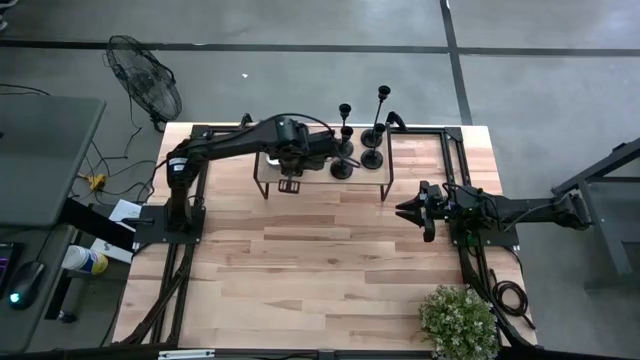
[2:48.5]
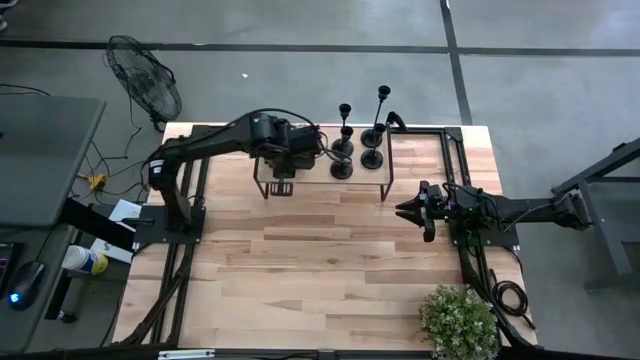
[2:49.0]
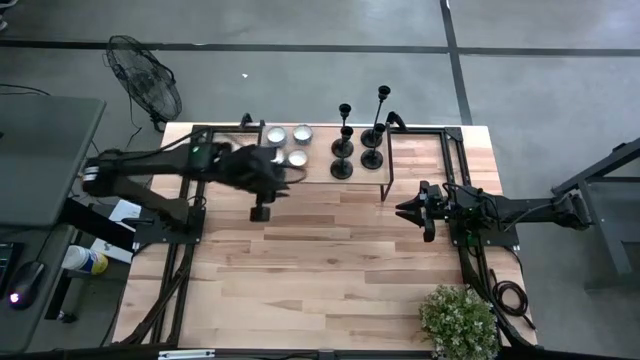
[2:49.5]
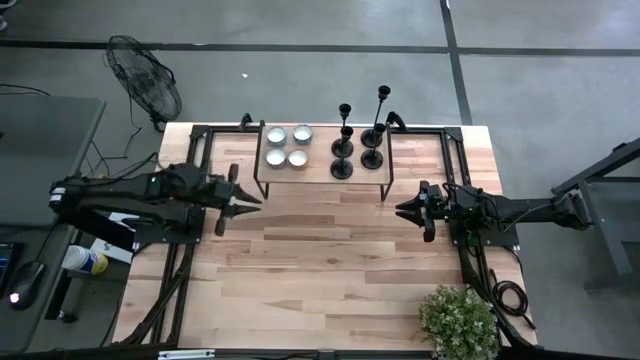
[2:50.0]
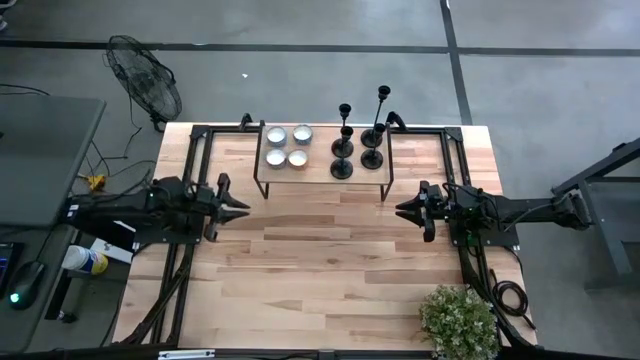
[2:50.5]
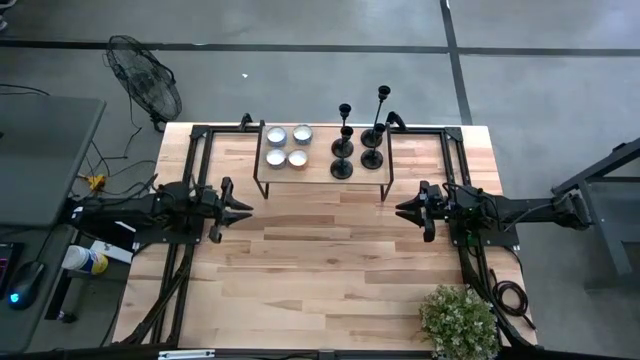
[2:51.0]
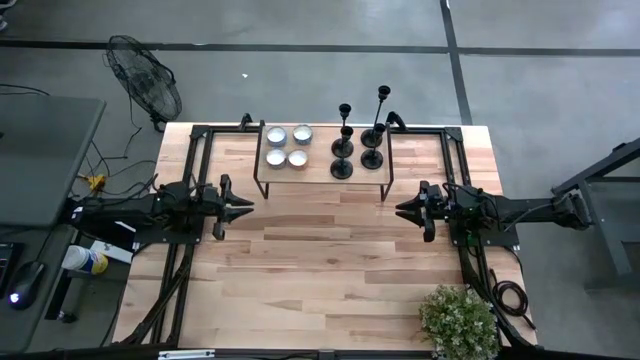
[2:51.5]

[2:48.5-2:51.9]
Task: Pick & Place candle stick holders
Return to Home Position

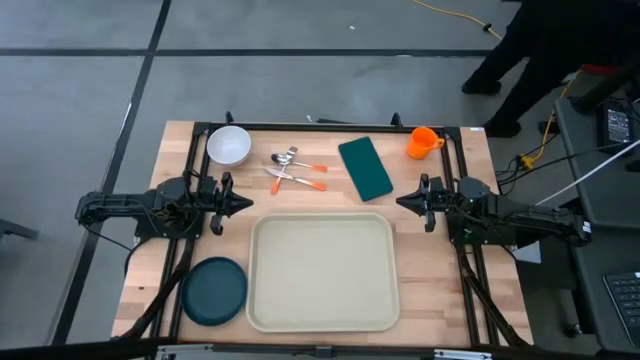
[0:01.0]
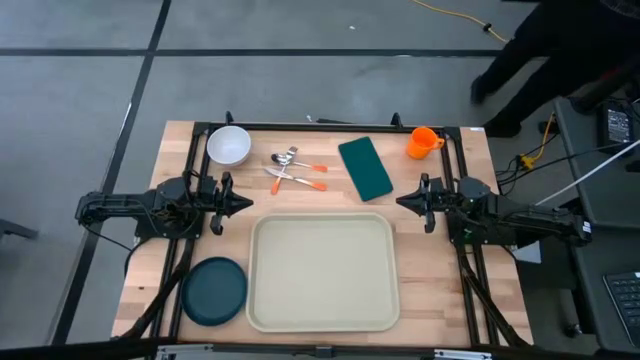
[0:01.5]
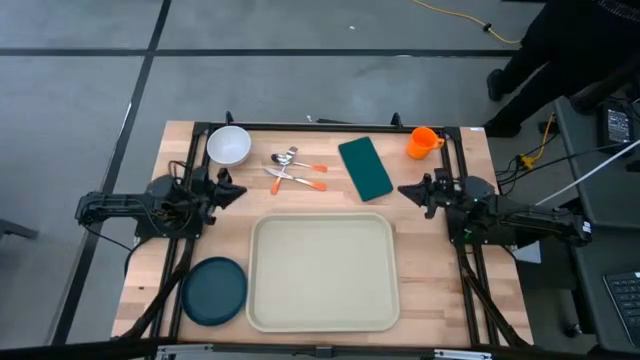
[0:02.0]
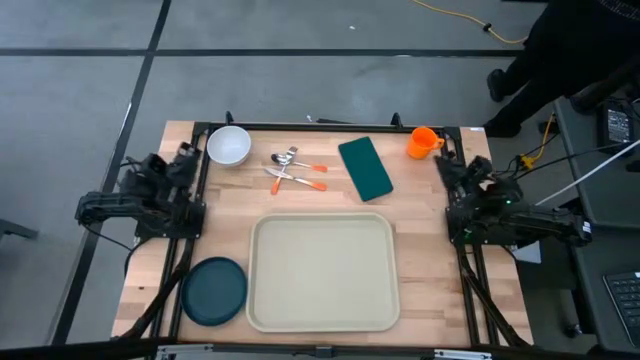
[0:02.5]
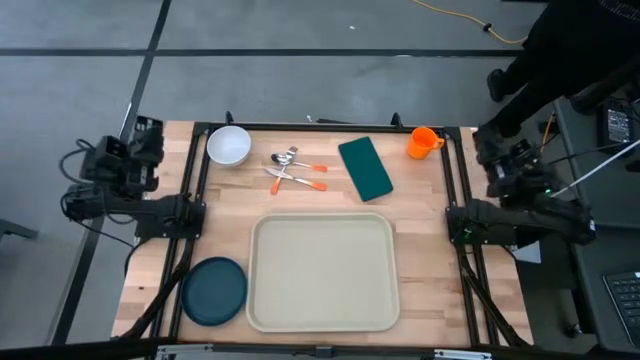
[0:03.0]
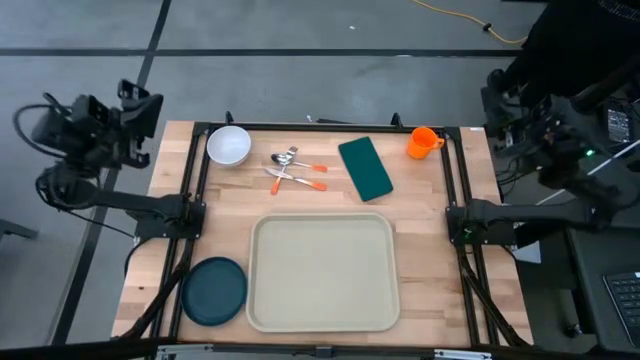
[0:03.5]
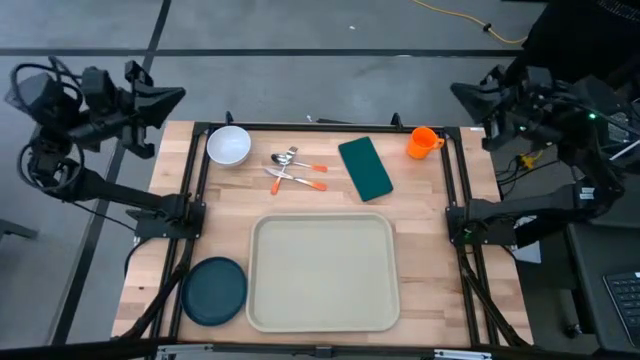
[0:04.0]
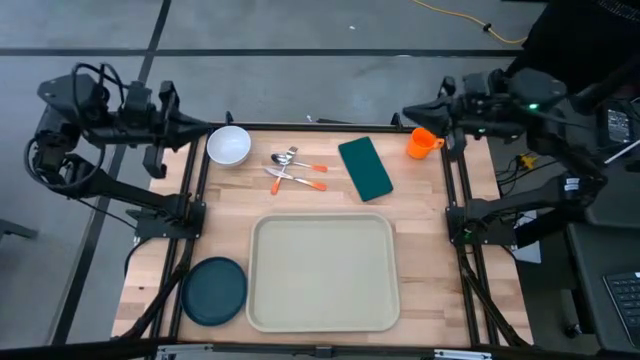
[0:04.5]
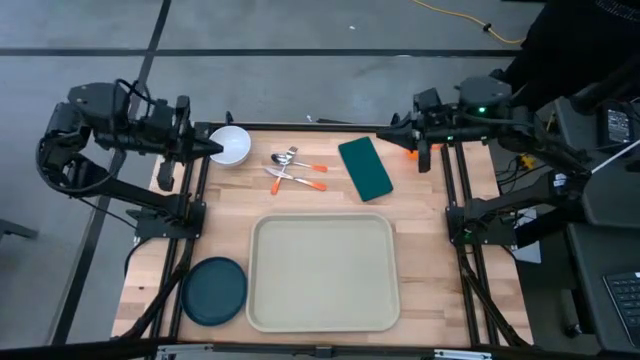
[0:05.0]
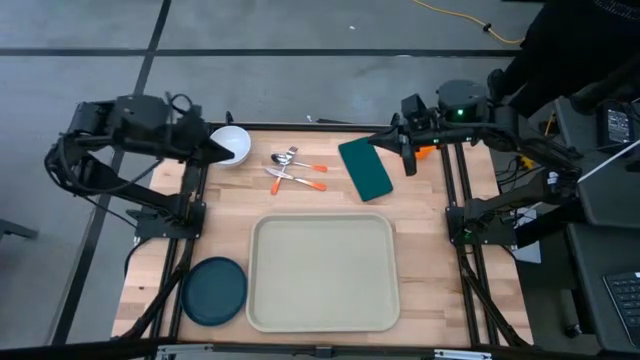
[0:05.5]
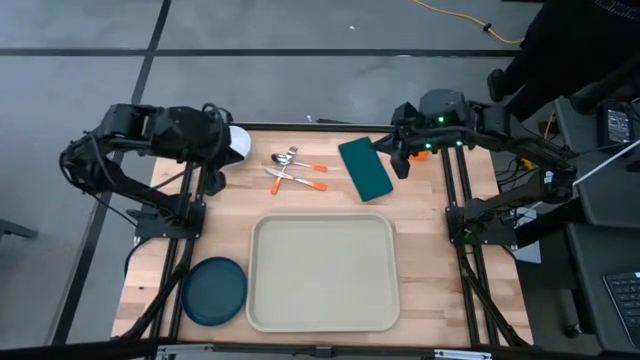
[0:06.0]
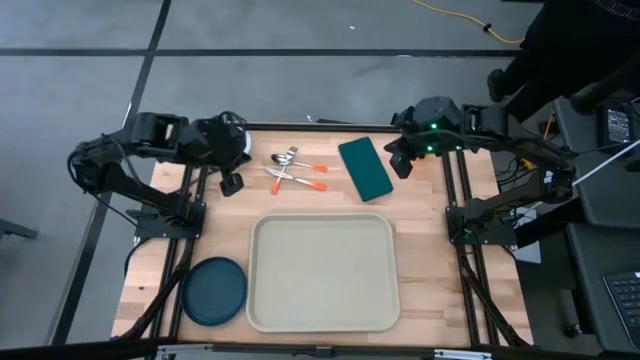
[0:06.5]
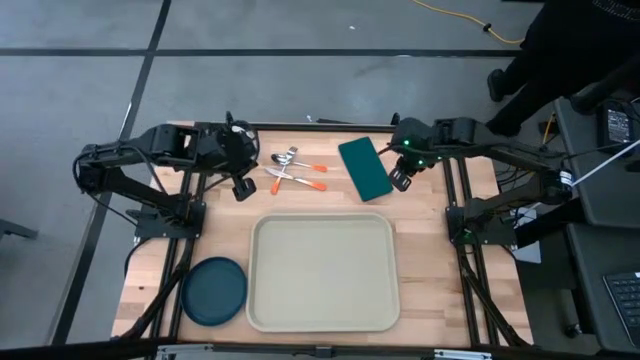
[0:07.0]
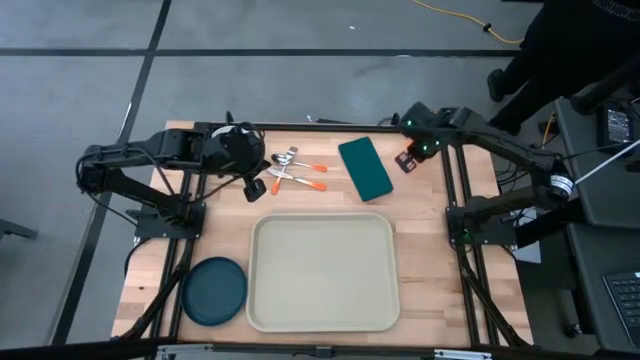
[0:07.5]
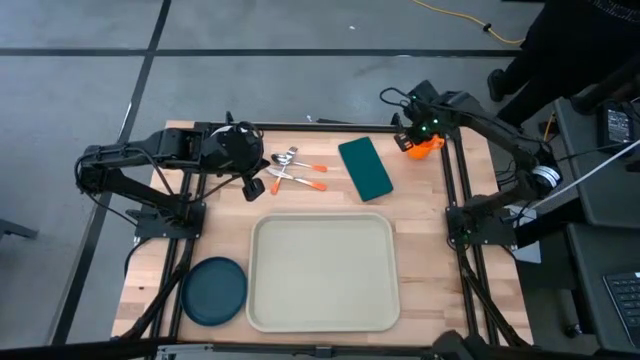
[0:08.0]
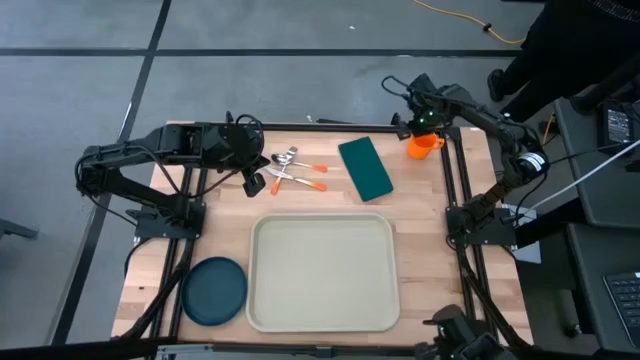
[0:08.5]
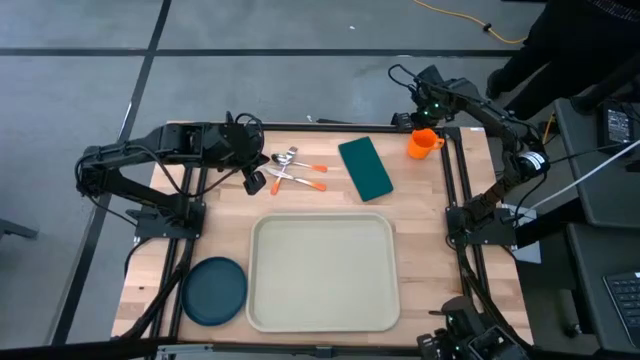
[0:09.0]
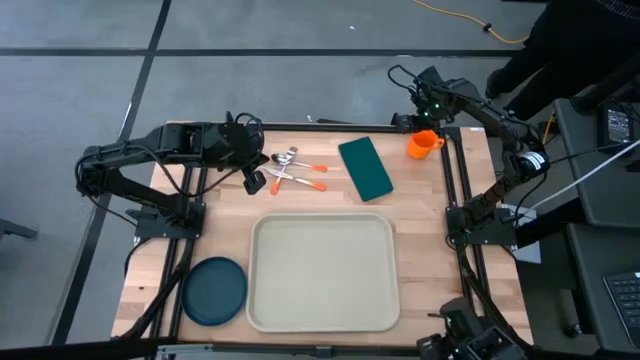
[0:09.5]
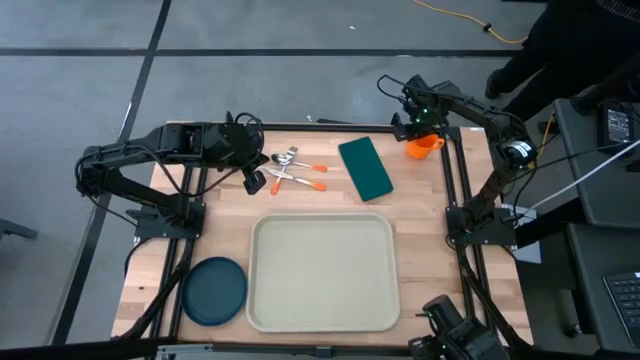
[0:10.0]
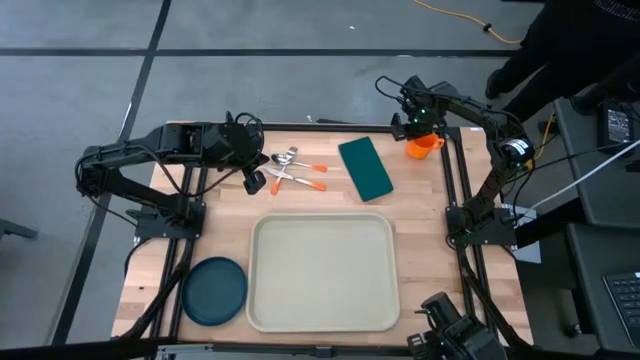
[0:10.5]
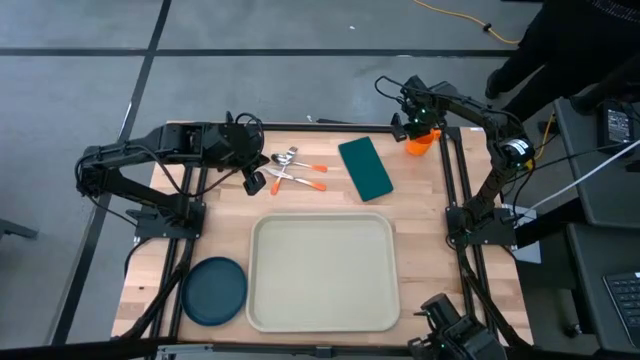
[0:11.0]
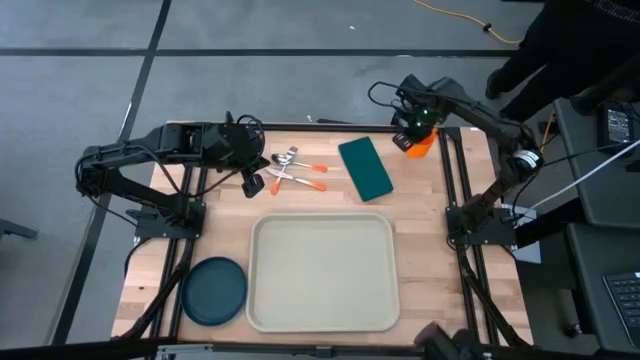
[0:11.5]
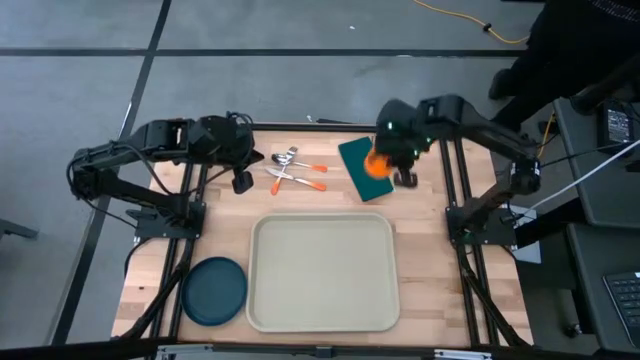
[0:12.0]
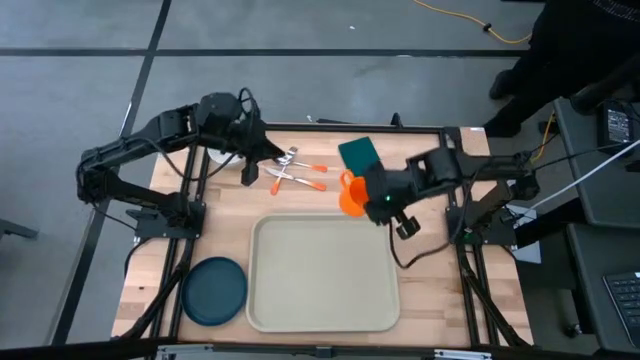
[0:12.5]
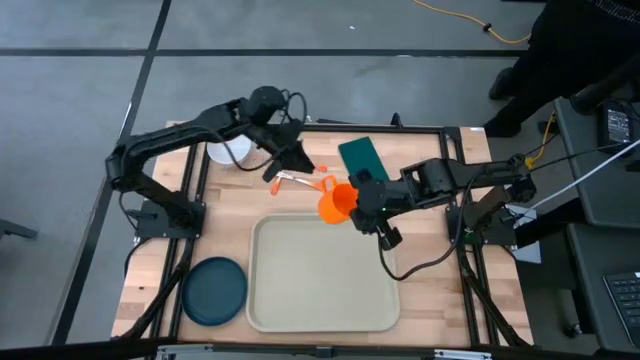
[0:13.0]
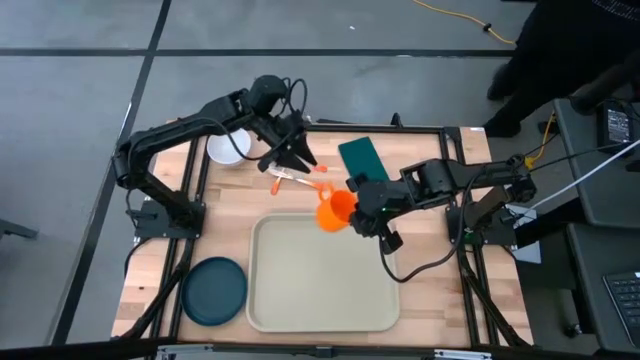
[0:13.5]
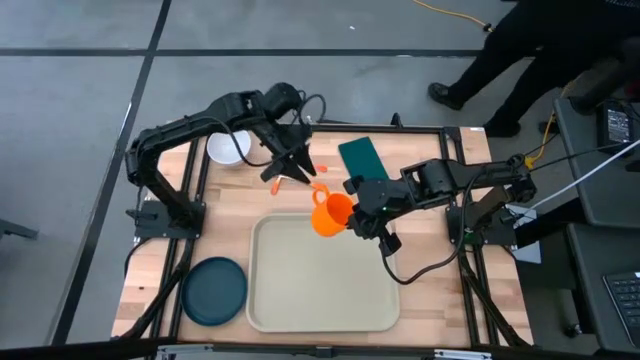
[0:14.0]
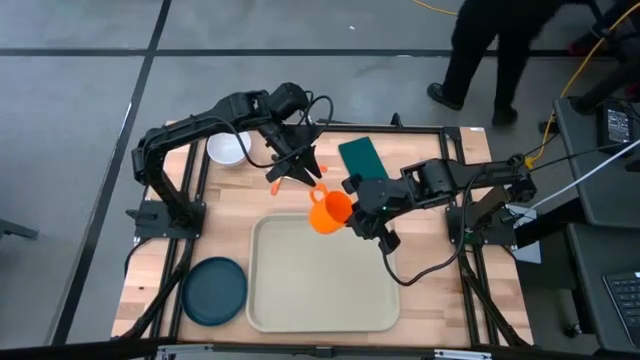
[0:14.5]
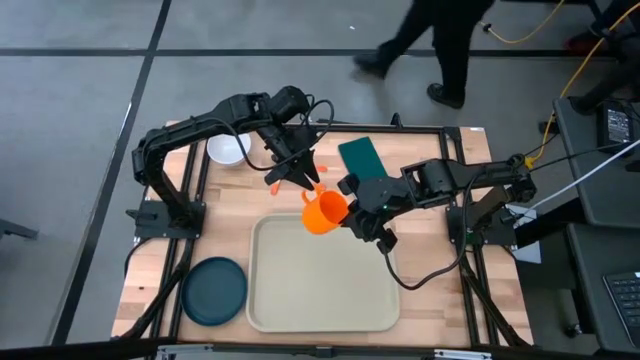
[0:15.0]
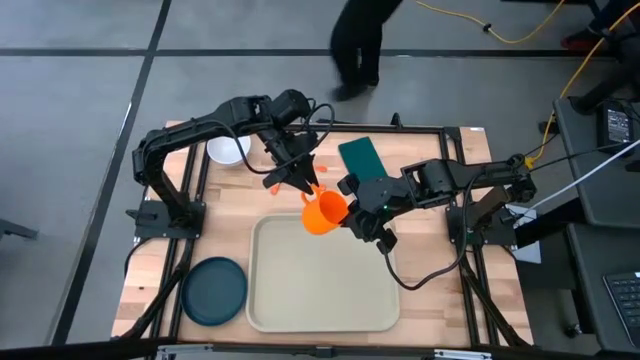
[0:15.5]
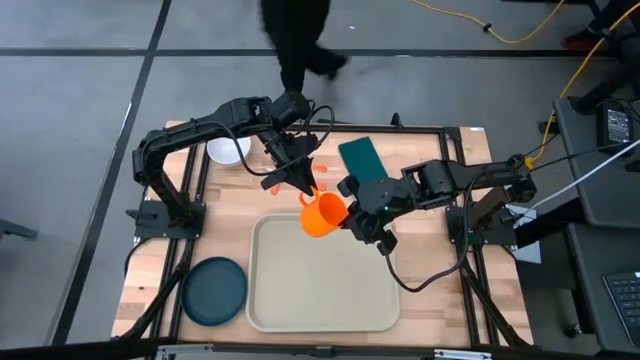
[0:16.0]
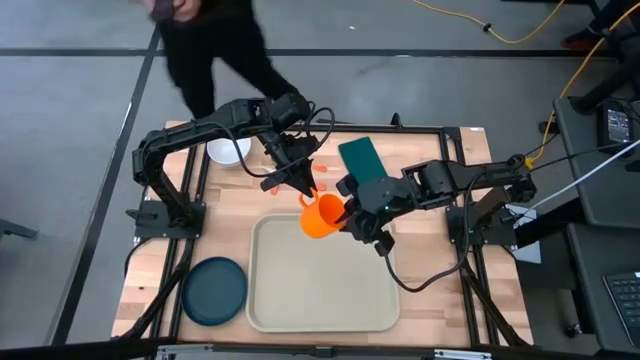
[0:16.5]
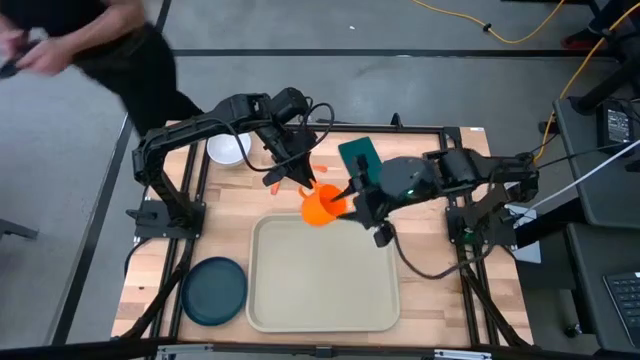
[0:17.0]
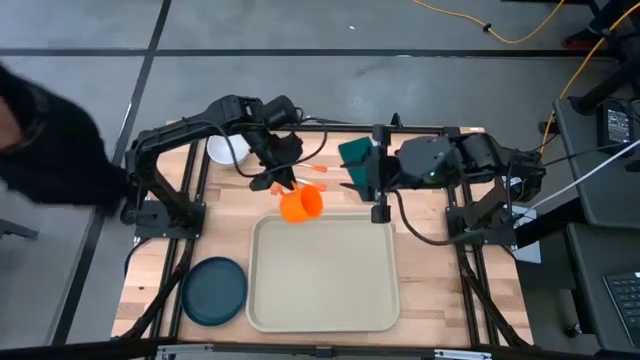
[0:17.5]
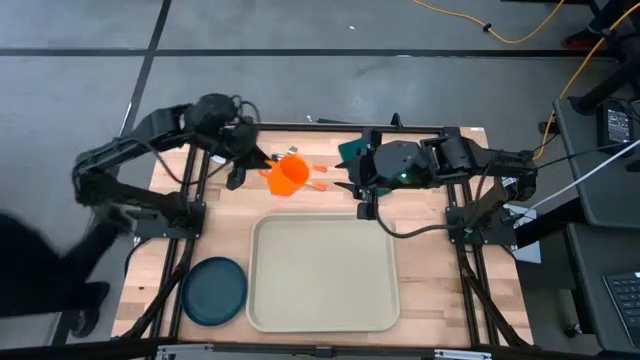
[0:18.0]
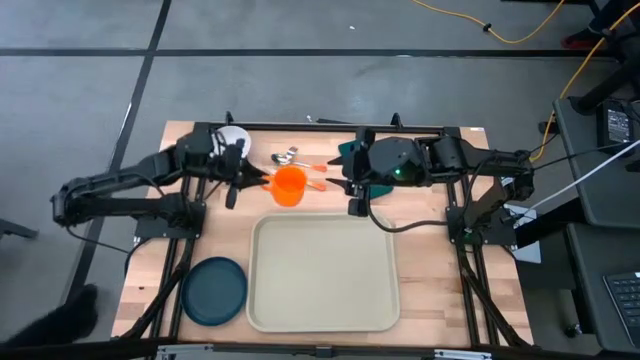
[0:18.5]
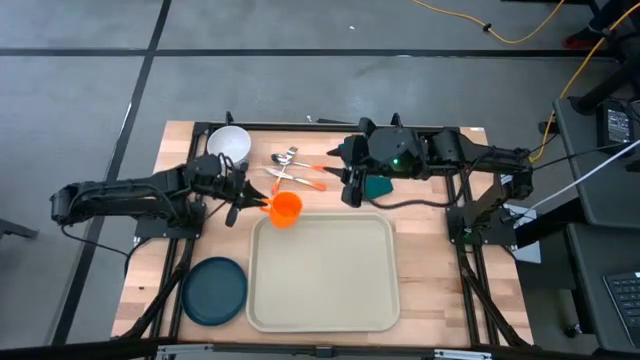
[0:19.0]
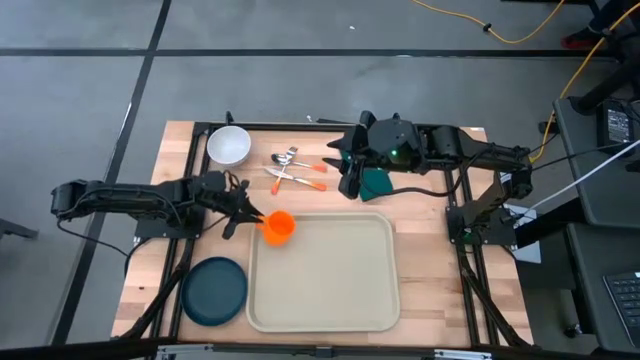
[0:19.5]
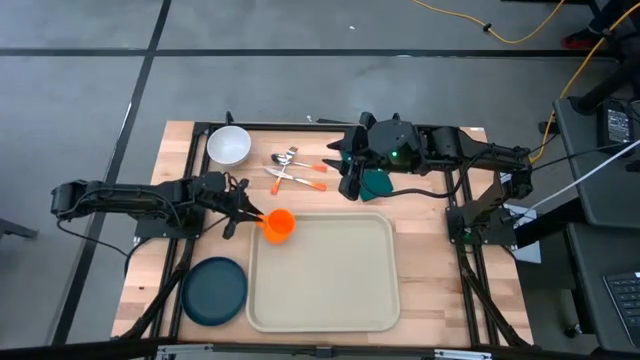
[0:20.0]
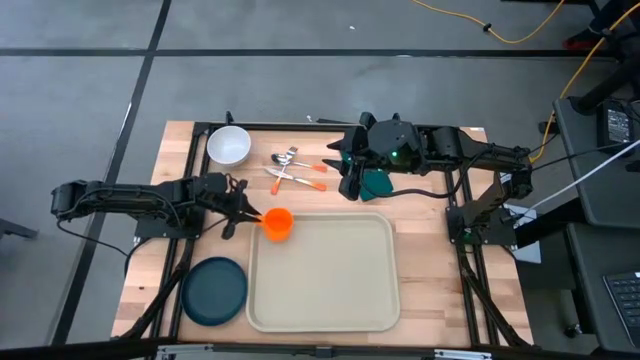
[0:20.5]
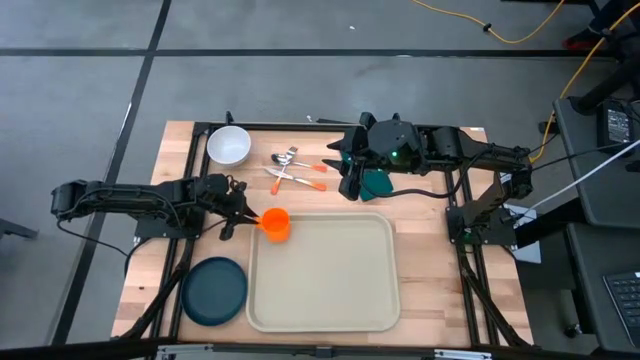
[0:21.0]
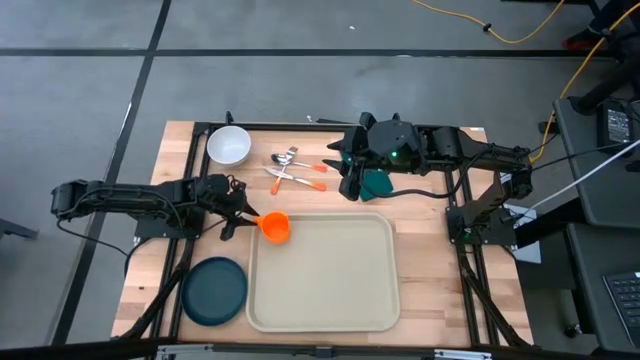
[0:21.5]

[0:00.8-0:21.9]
Task: Set up tray
Put the orange mug on the gray serving tray
